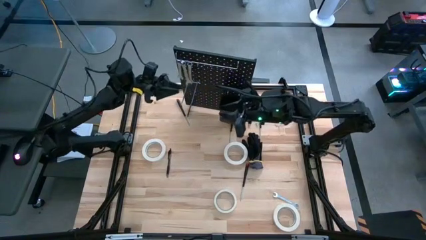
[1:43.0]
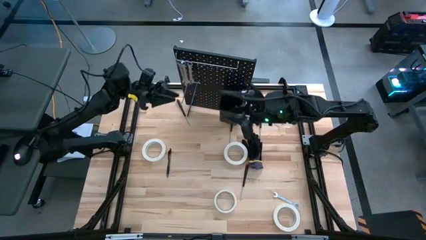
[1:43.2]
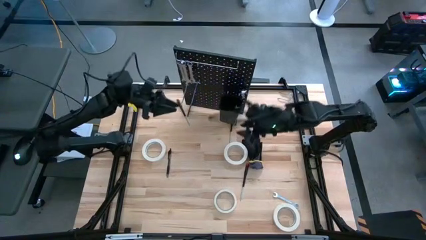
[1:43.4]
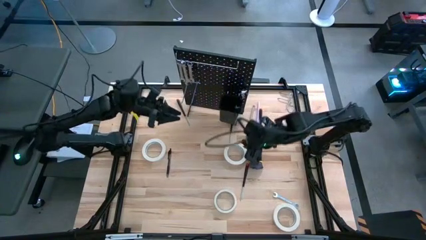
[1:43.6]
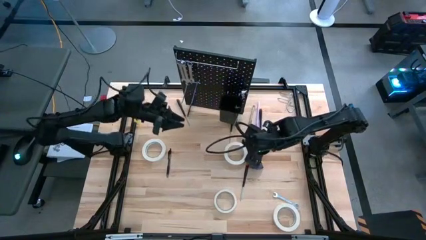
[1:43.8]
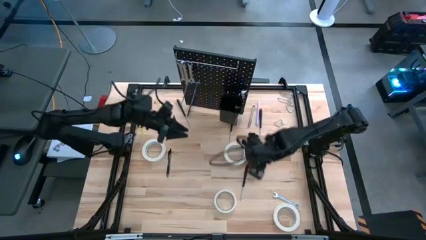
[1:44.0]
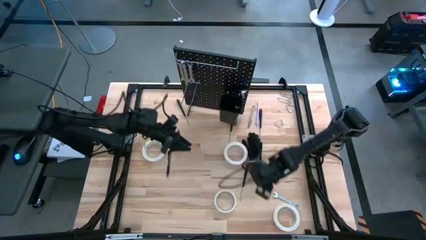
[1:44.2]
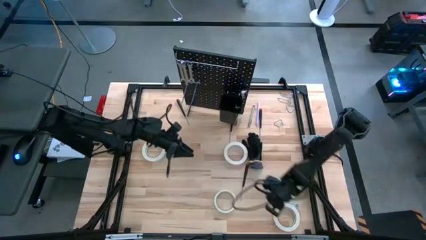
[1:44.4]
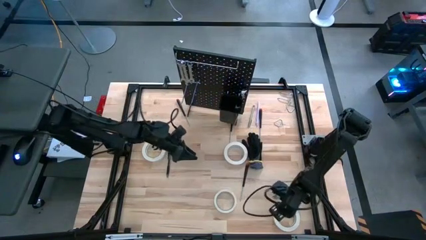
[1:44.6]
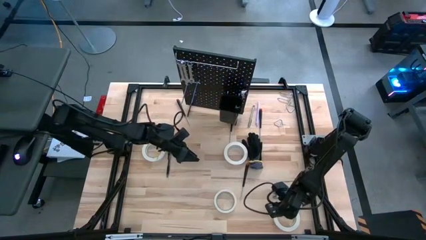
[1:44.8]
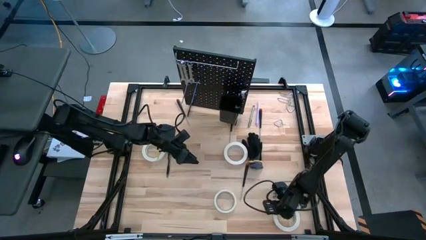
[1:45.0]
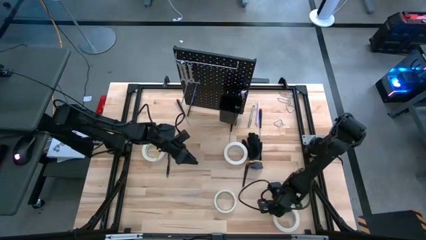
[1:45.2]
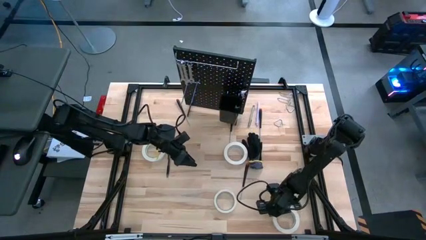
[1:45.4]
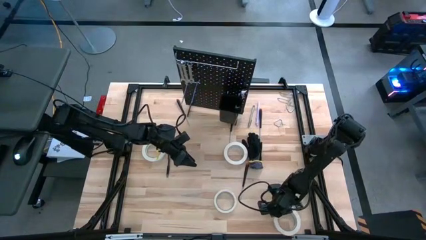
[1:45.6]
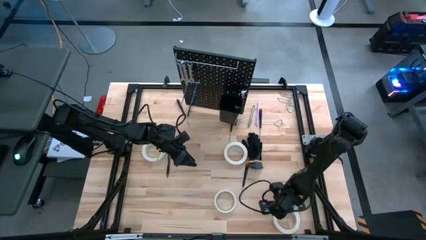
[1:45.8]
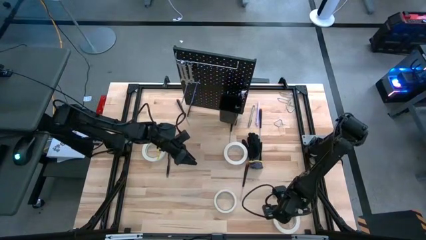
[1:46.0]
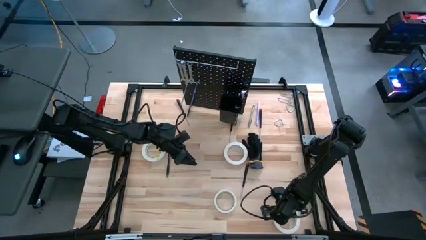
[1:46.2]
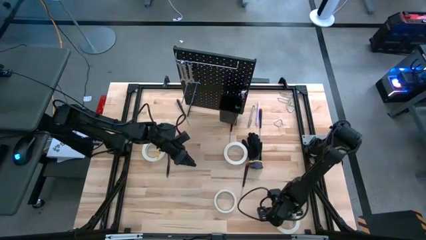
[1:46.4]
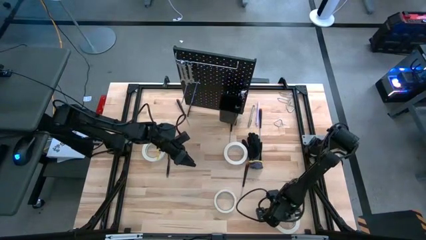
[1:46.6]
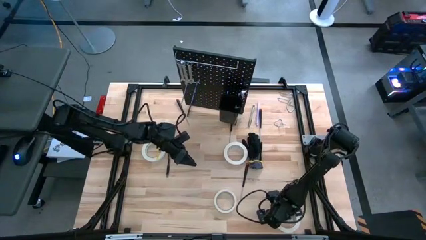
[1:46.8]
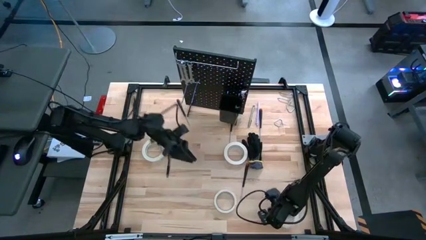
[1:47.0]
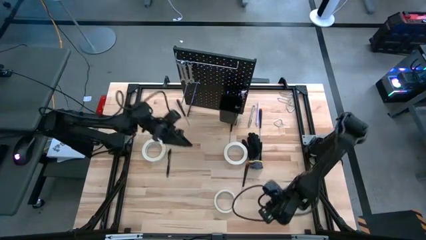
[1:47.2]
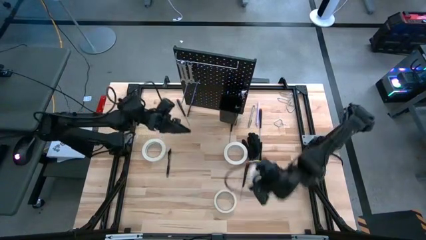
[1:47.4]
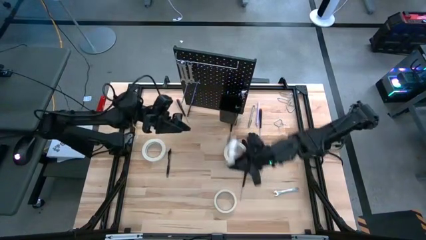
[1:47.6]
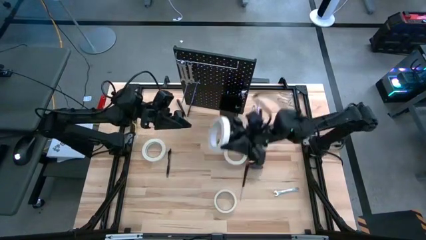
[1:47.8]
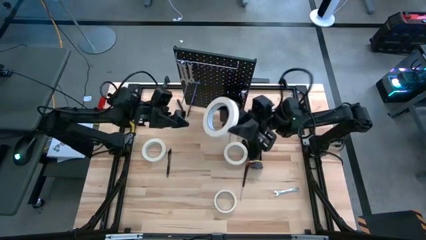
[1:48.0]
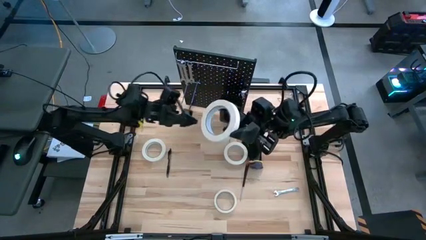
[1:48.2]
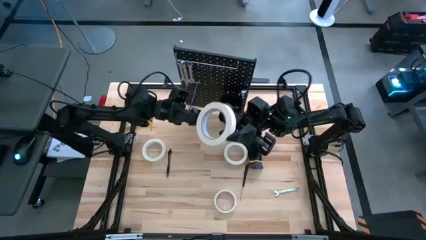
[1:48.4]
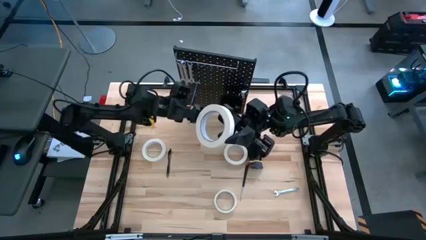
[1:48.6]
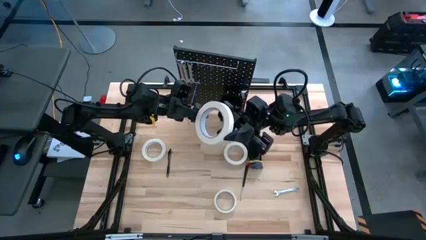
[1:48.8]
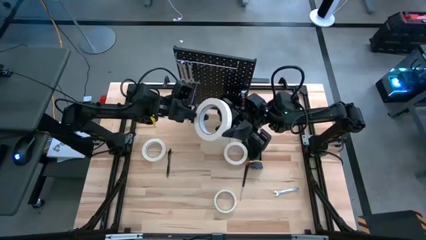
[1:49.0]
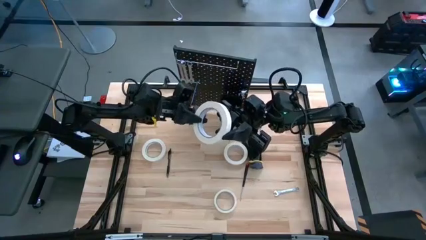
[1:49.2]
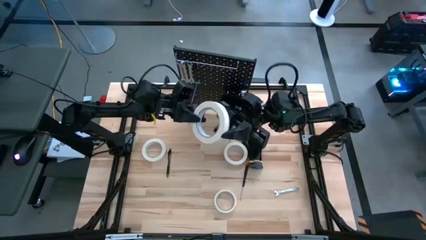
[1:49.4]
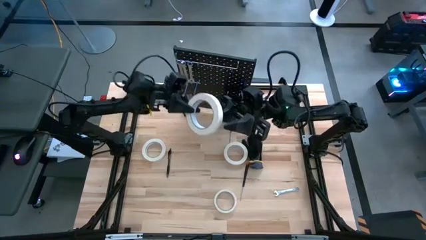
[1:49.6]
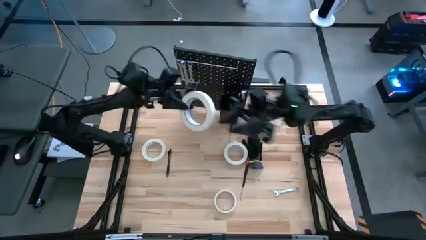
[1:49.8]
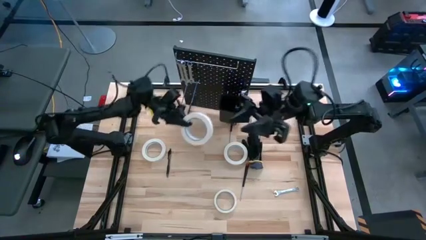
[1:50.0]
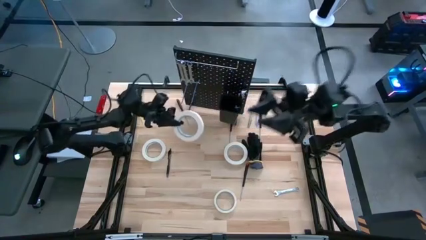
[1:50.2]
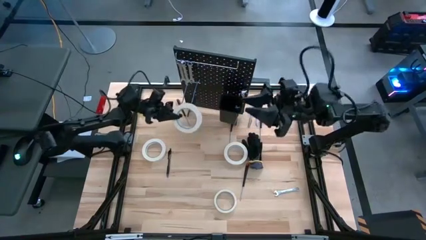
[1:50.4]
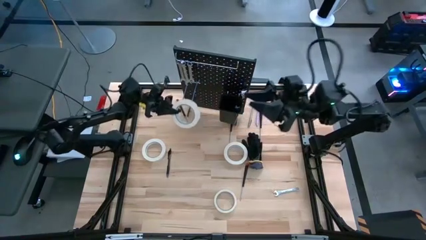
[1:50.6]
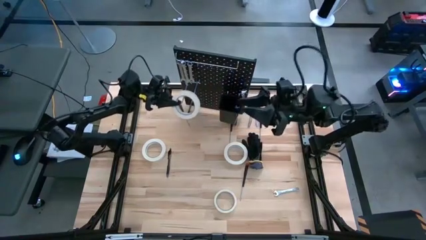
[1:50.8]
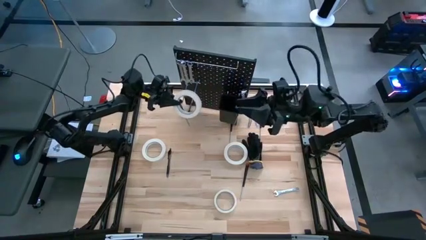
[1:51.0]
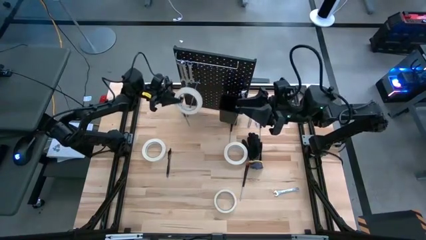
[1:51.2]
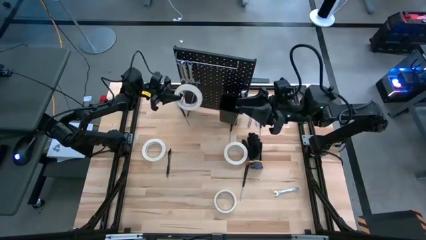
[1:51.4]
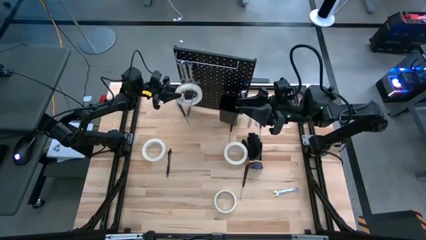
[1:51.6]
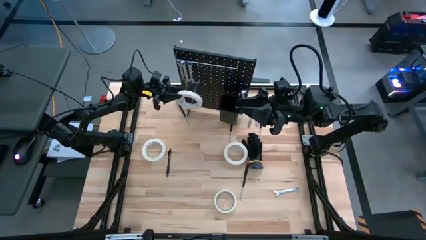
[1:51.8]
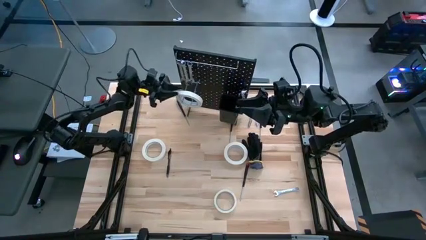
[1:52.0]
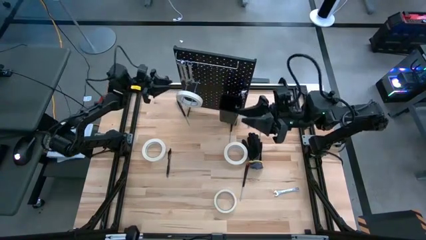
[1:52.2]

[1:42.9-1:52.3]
Task: Hang tools onto peg board
Hang the masking tape onto the pegboard

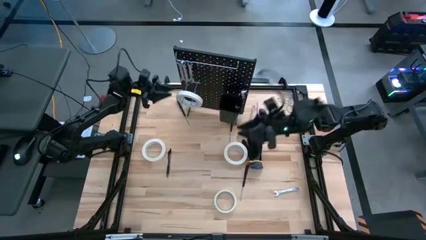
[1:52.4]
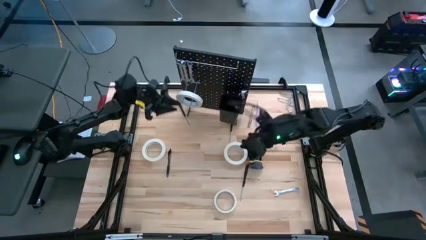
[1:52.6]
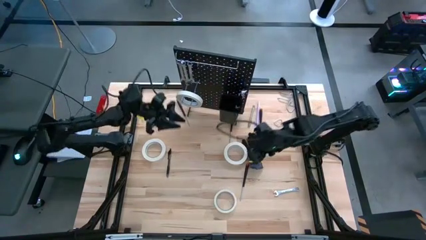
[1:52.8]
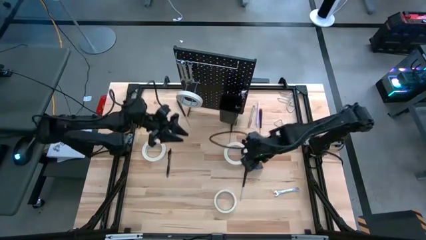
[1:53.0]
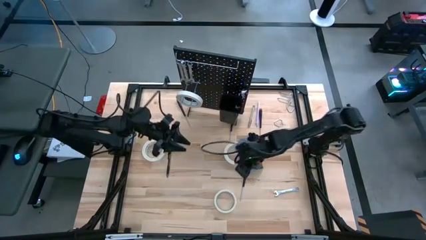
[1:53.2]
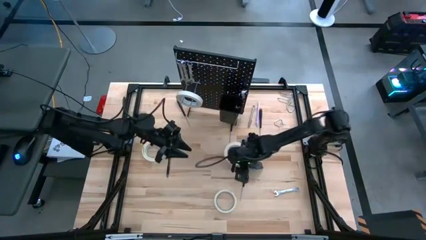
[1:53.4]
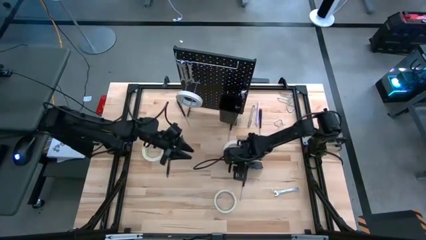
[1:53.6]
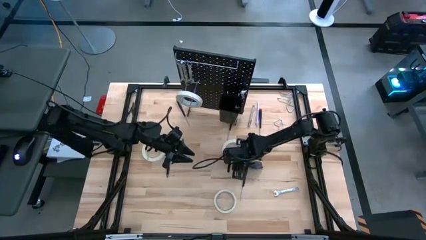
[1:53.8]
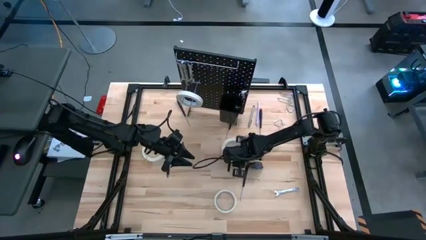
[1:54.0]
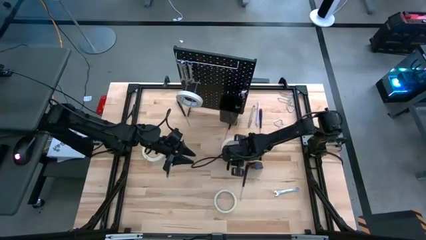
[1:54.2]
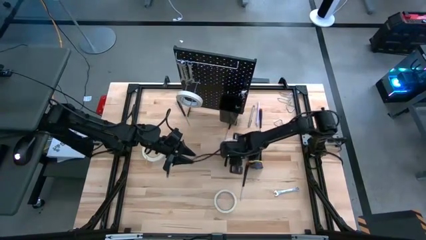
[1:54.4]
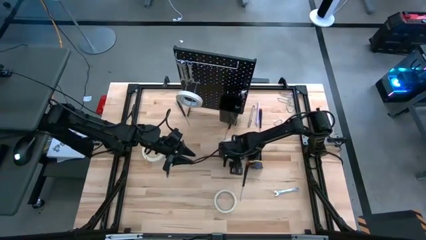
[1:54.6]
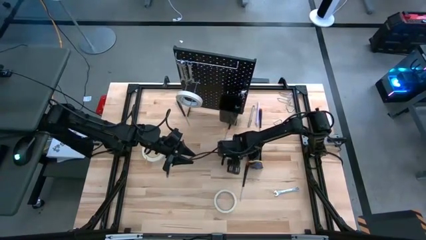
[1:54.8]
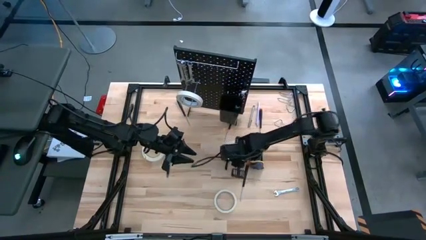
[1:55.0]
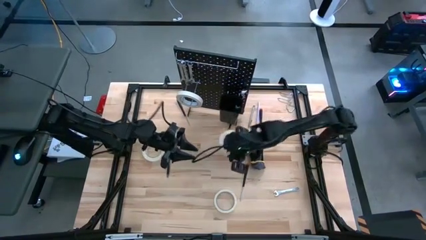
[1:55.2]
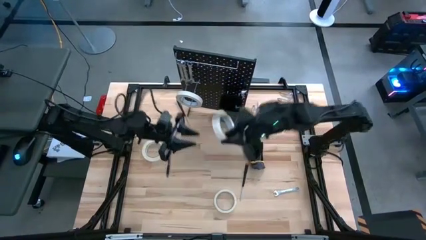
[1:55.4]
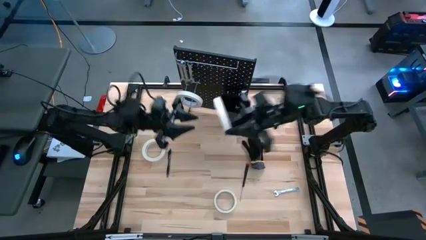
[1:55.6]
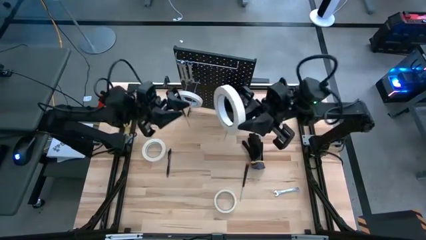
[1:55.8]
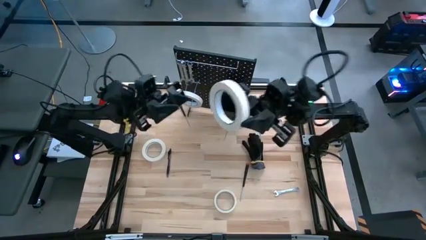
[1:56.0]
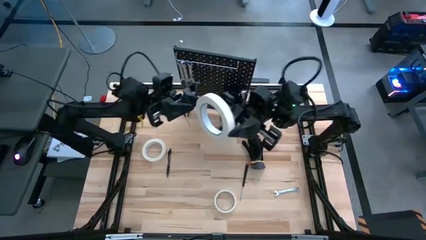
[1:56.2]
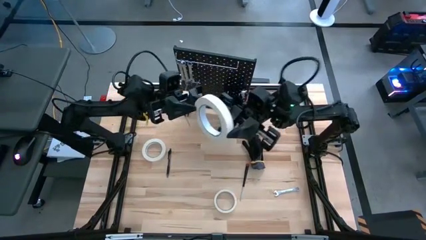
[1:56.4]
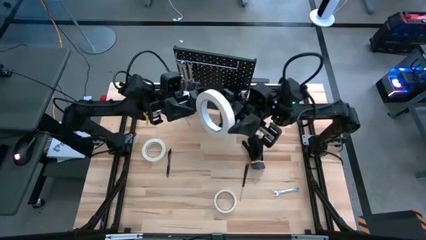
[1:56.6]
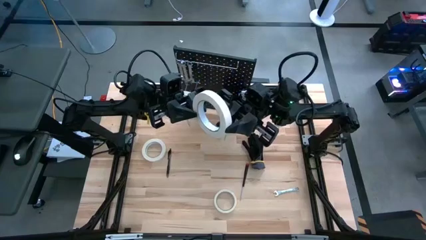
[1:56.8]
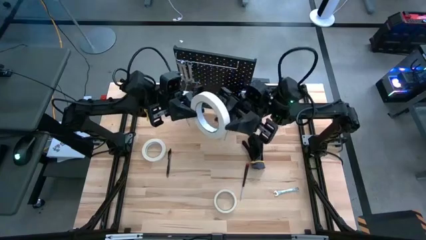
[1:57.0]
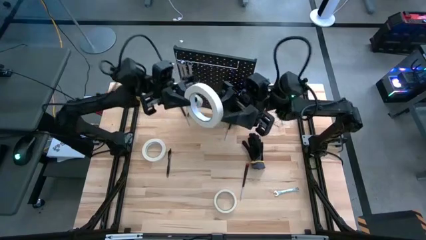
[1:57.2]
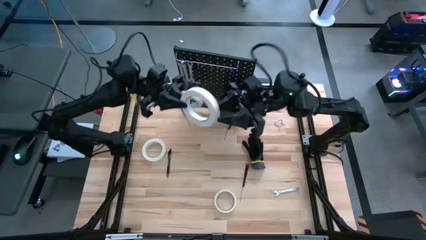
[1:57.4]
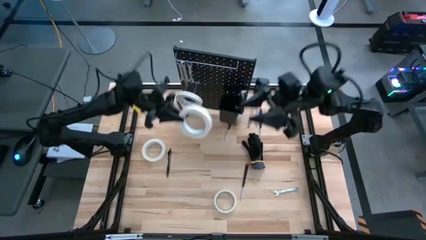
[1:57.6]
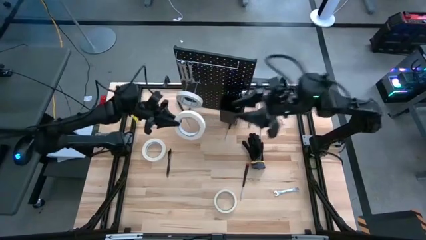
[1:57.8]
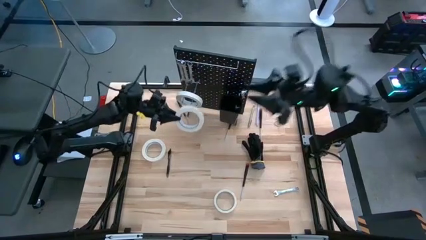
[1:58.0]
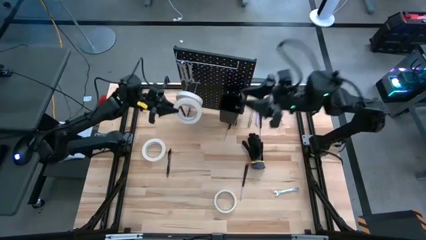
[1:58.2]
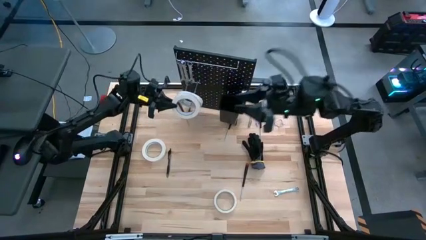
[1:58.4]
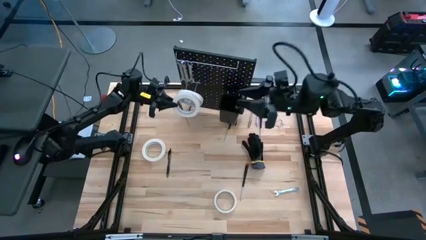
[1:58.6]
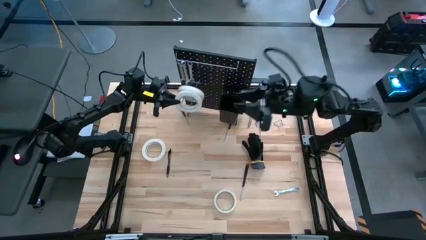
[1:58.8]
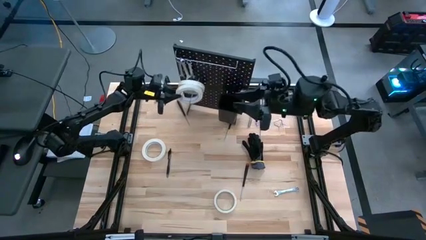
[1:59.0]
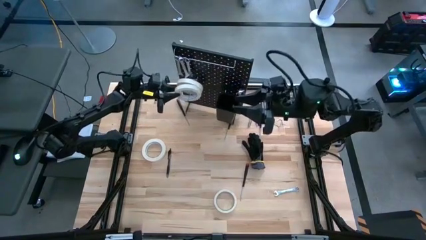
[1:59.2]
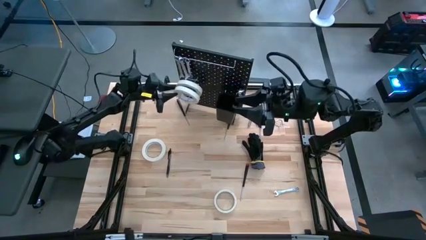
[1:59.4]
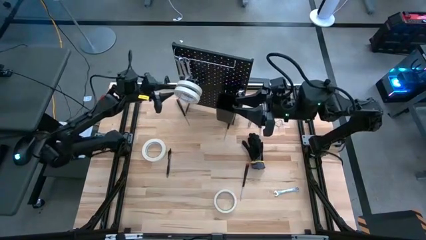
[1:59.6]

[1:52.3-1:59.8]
Hang the masking tape onto the pegboard
